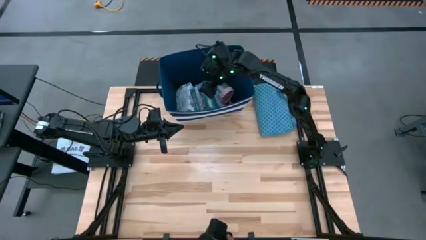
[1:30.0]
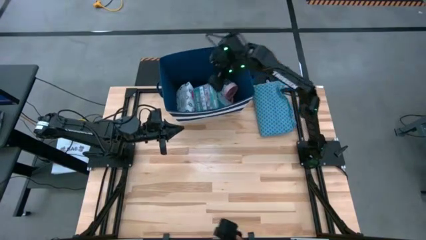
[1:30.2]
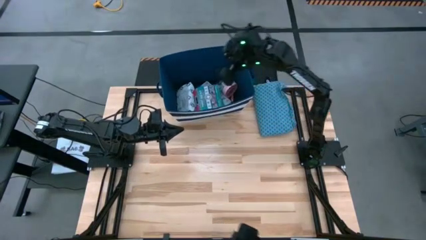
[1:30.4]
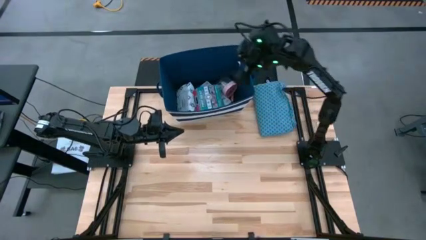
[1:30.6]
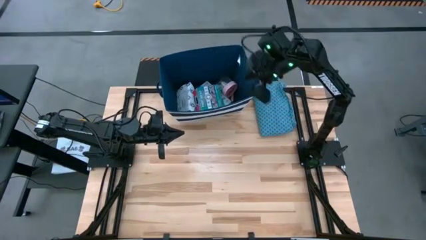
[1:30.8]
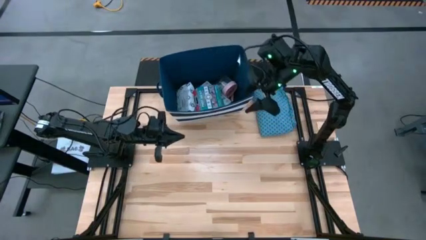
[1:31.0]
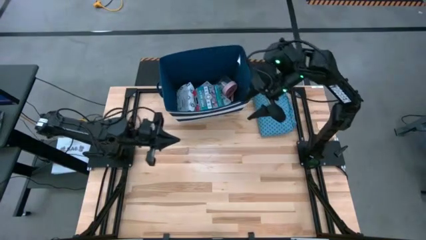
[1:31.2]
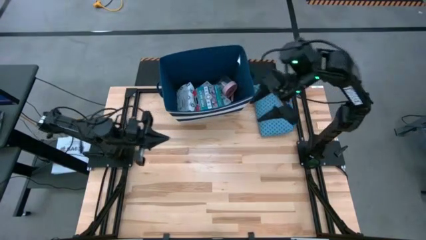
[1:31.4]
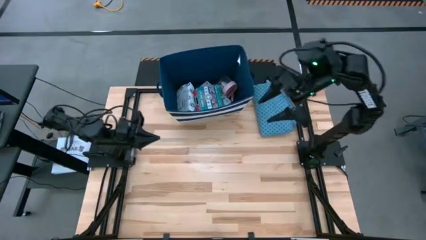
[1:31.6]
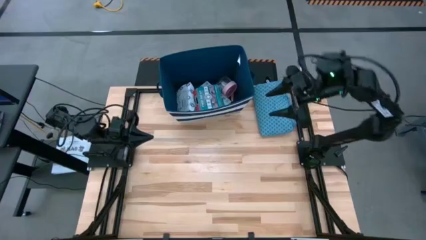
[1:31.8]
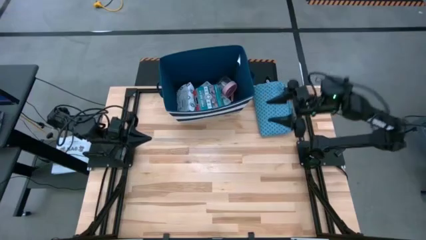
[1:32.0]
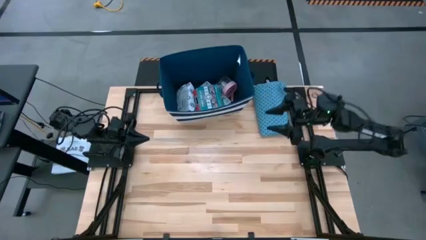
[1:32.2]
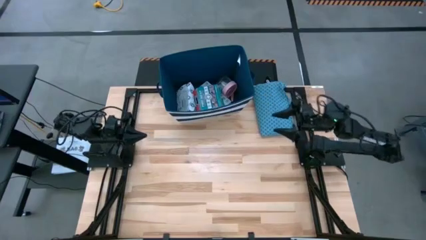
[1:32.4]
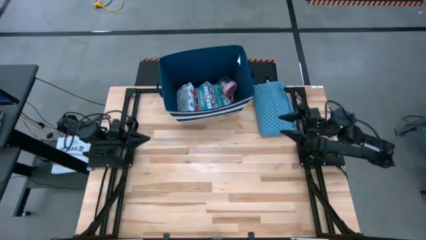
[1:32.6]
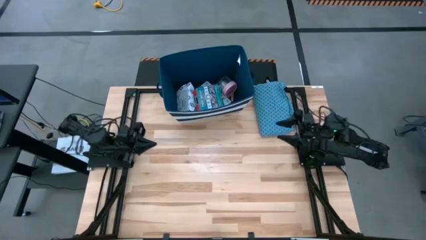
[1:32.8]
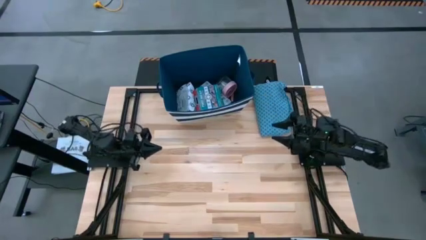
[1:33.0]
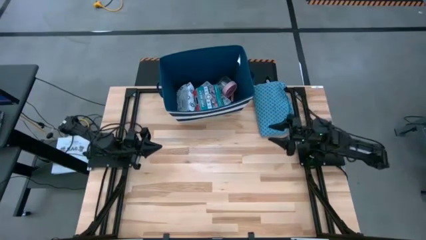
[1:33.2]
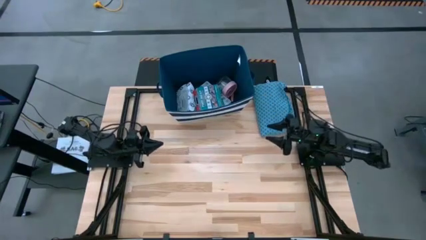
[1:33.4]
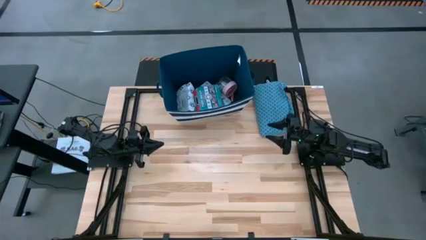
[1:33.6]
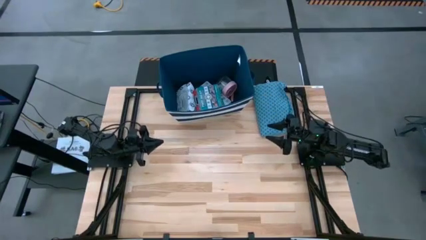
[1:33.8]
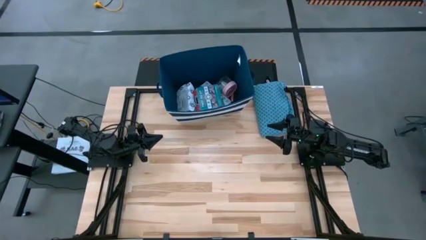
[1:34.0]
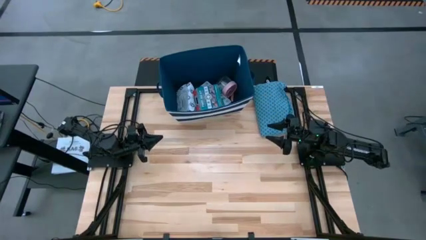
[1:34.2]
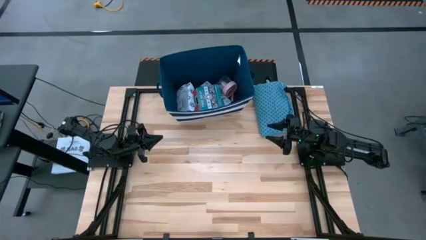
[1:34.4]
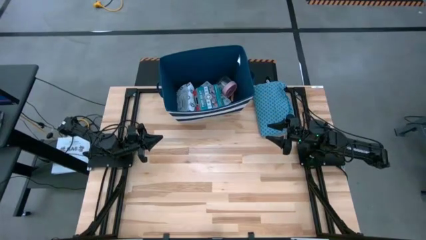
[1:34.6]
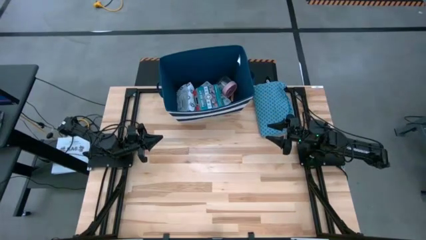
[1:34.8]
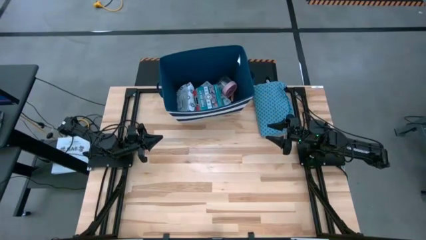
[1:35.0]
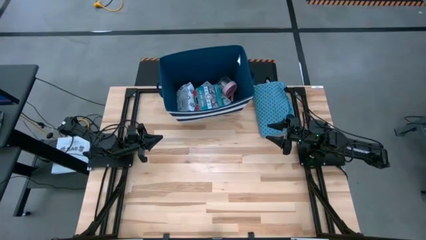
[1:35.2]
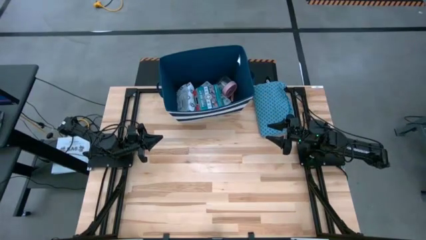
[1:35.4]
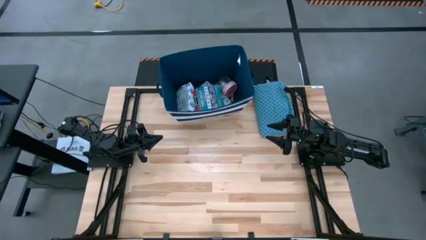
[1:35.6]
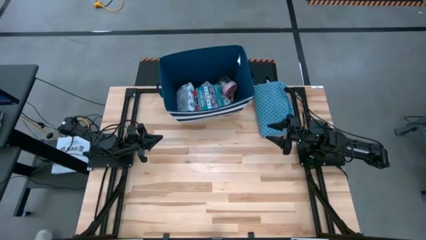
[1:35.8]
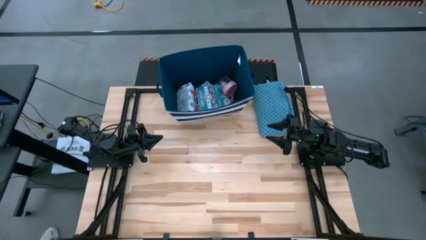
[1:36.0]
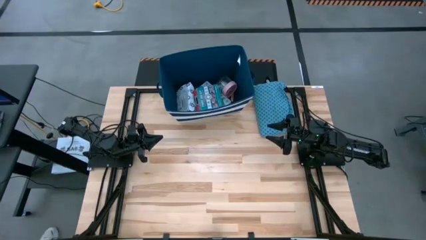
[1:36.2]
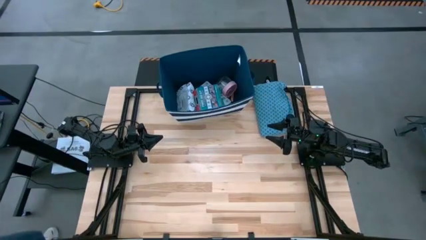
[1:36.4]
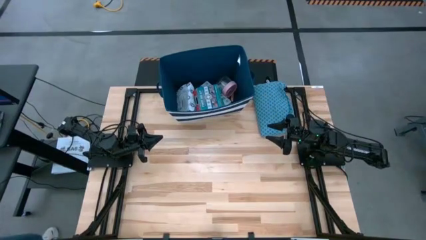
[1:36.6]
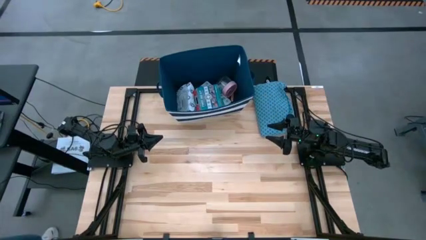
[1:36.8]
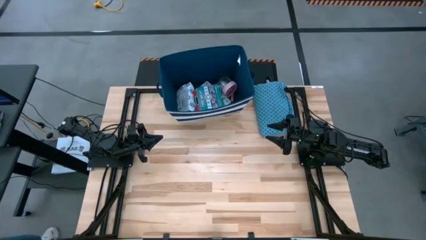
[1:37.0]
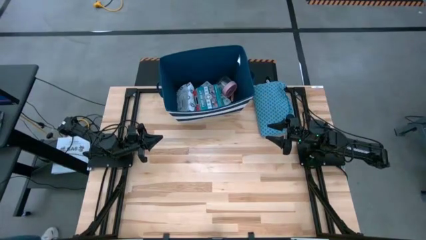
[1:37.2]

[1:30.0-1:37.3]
Task: Pack medical supplies into shirt
Return to Home Position

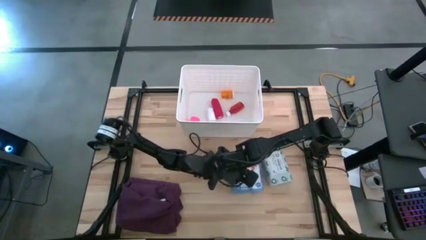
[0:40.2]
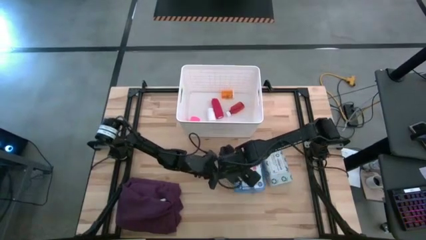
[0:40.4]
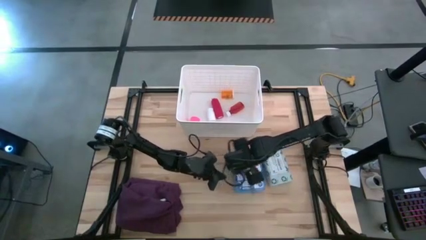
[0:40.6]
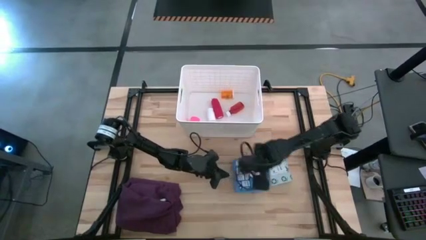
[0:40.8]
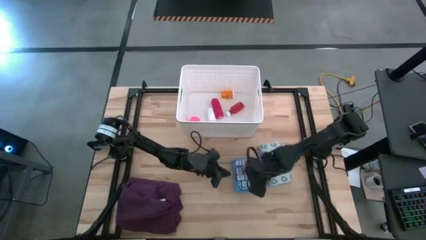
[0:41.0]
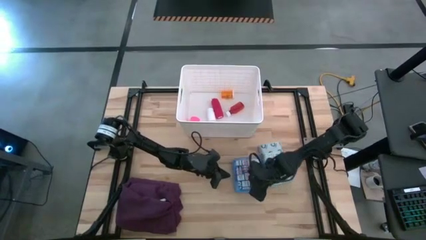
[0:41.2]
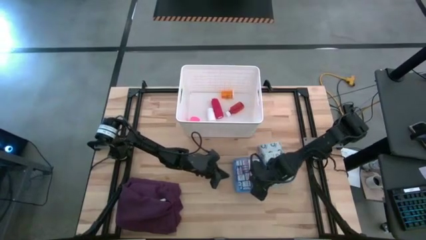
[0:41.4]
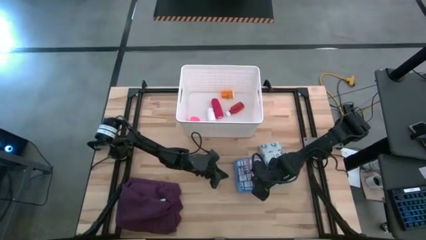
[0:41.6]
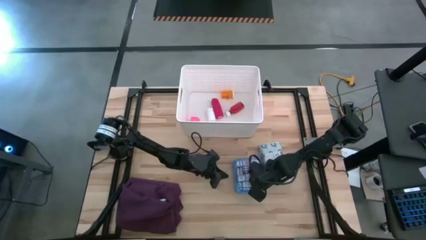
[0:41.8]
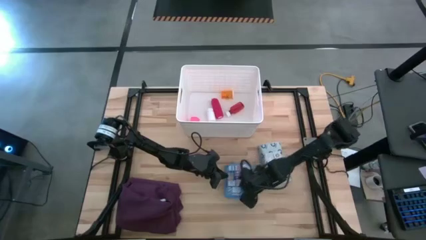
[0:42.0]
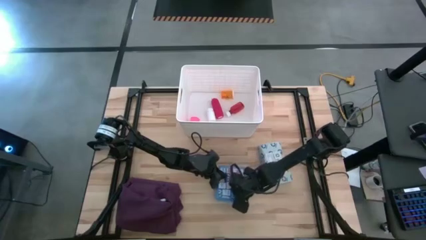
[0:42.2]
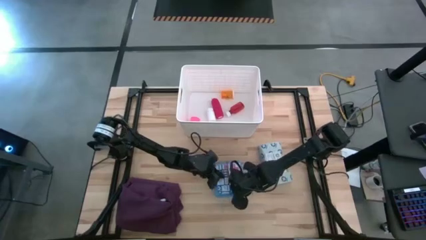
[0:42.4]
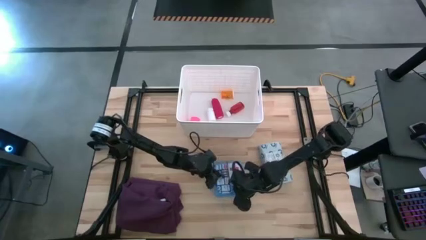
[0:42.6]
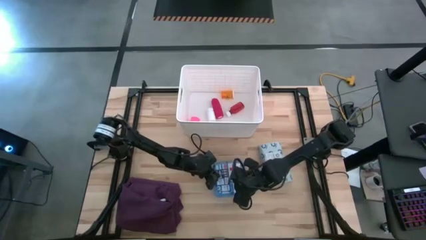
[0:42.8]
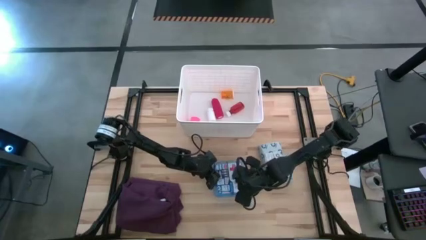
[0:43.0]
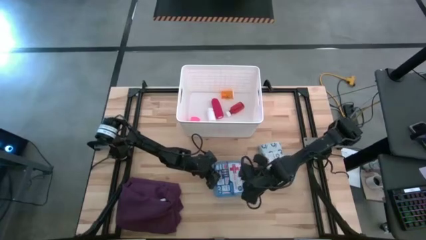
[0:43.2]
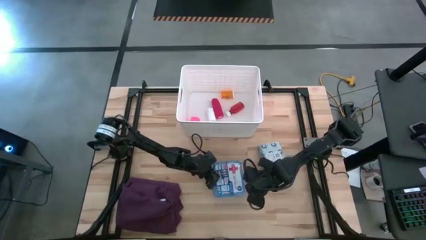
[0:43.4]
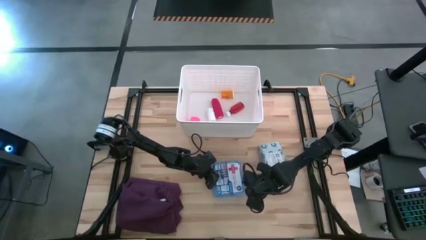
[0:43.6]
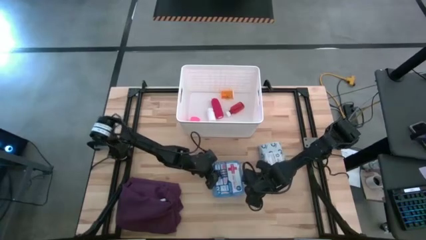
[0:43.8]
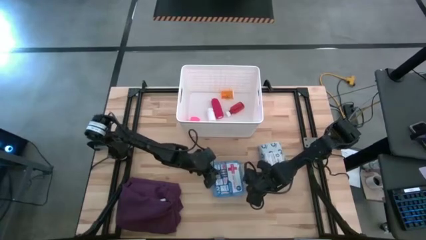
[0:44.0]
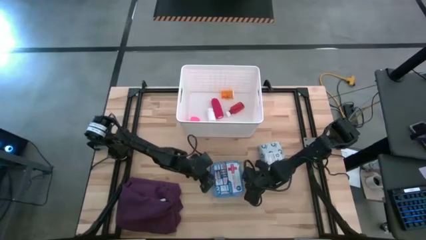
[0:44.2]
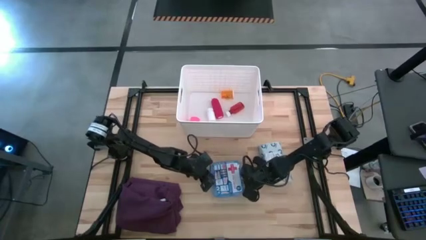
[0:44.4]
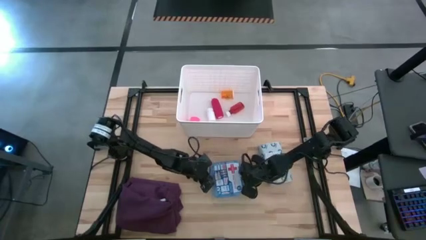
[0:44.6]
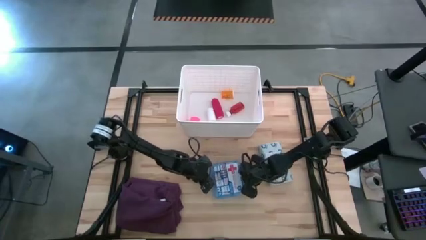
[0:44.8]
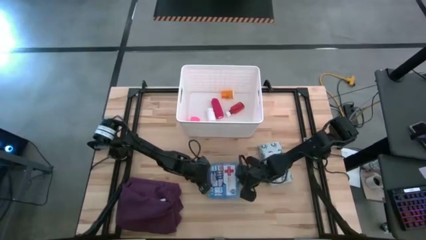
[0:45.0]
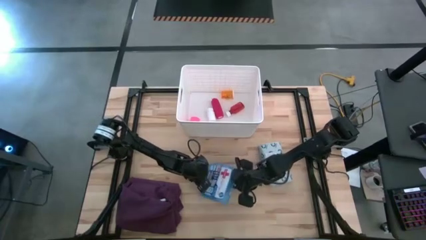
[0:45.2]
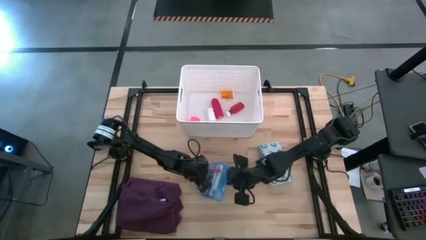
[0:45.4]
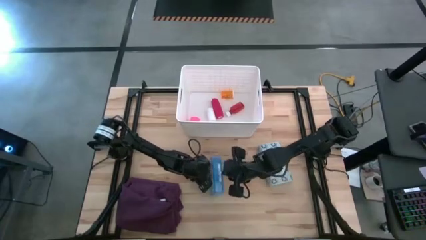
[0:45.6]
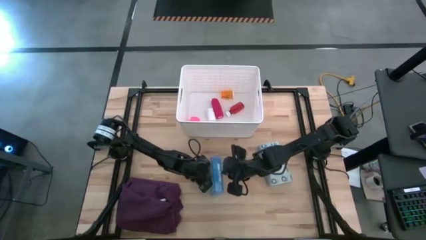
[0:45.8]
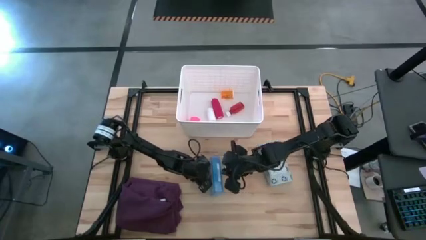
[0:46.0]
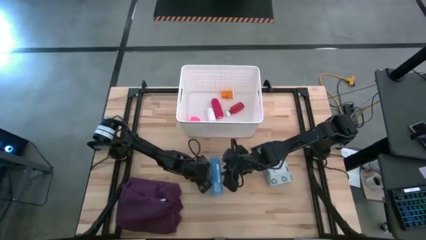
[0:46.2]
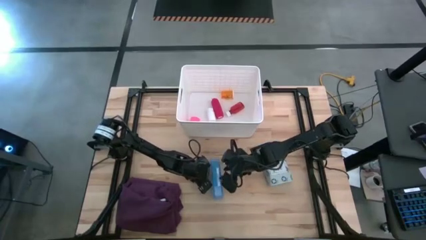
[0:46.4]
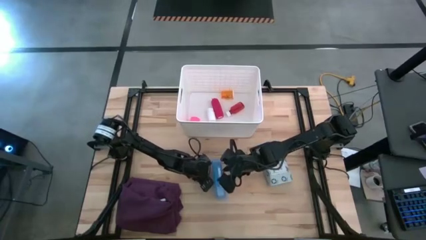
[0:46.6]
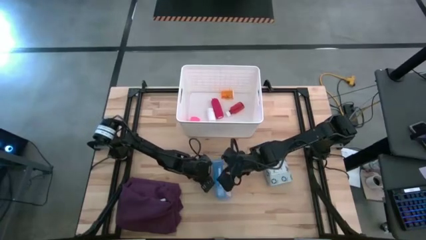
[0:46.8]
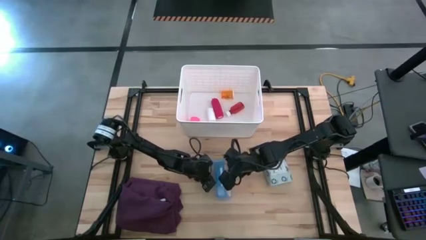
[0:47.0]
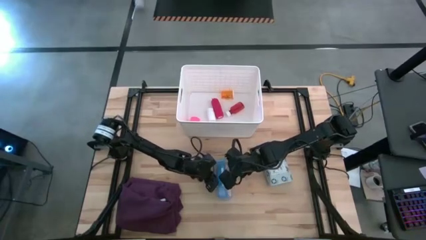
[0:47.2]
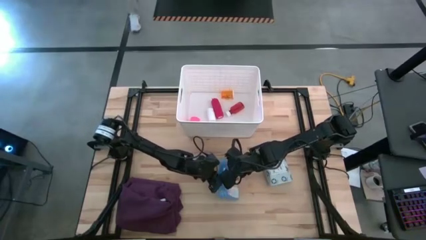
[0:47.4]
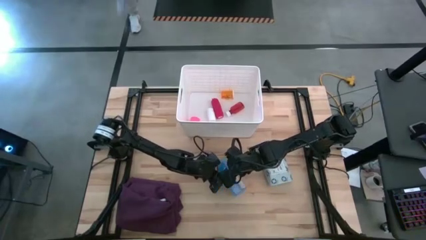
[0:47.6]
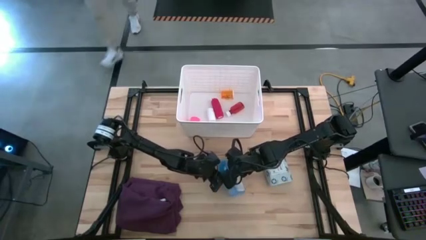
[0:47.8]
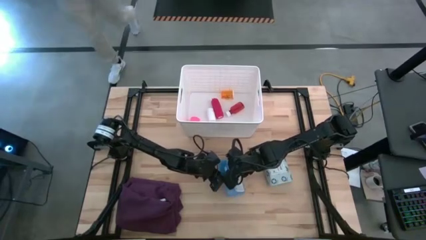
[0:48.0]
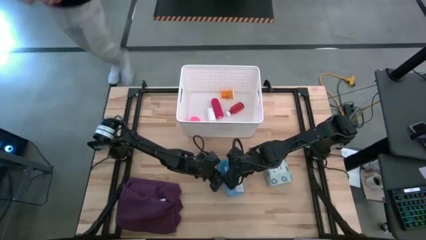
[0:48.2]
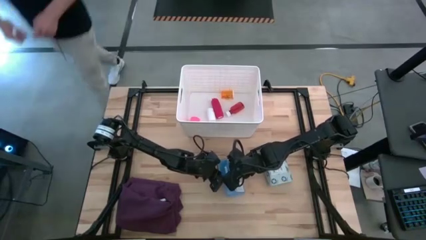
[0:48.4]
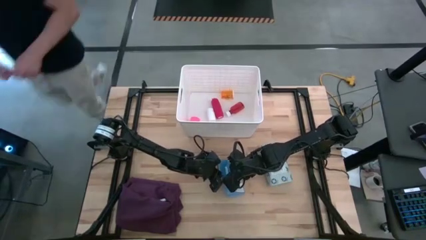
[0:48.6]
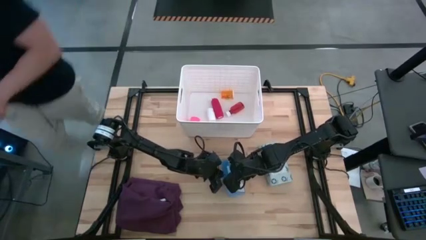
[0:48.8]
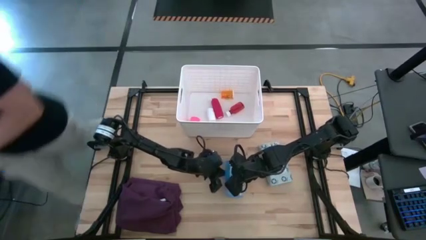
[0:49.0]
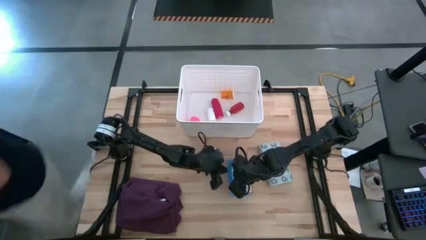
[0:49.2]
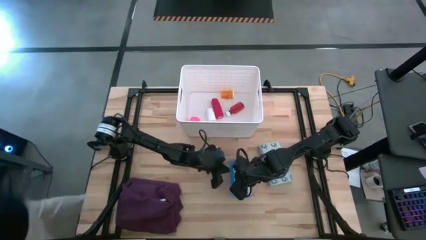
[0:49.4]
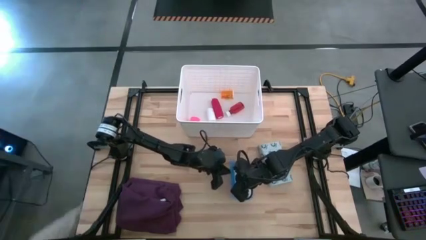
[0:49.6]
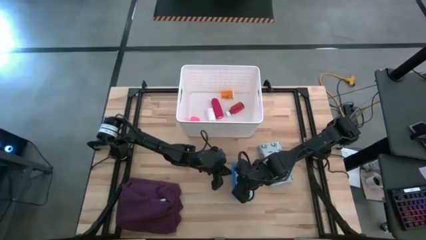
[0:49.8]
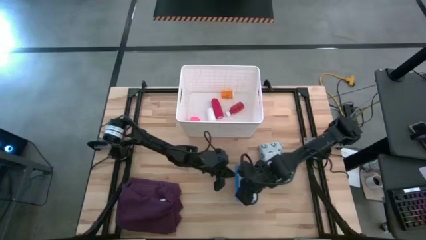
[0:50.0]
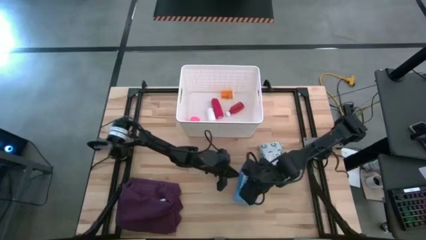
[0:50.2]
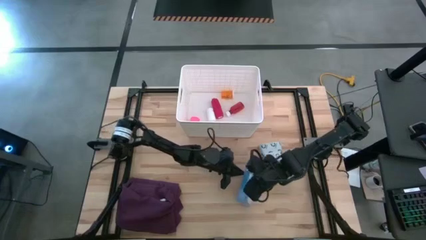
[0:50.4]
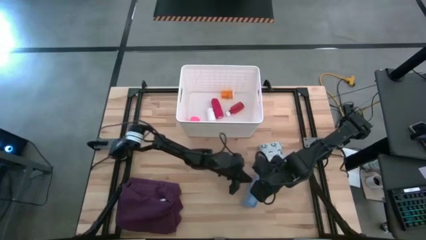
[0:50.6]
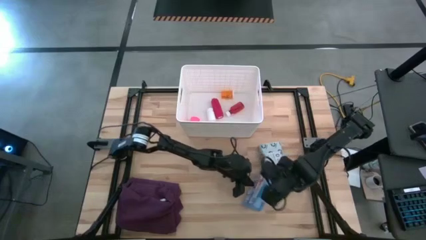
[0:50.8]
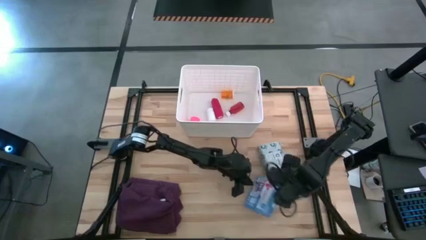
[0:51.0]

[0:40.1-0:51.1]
Task: Pick & place medical supplies in basket/bin
Put the blue first aid kit box into the white bin
